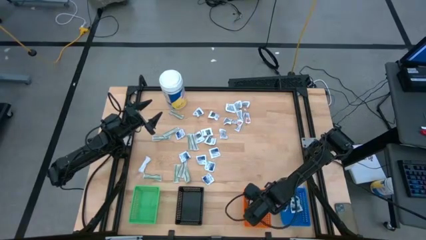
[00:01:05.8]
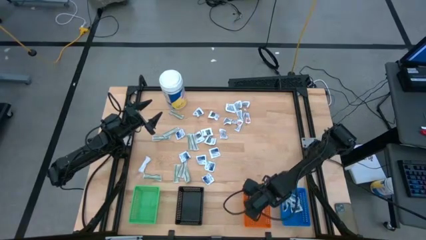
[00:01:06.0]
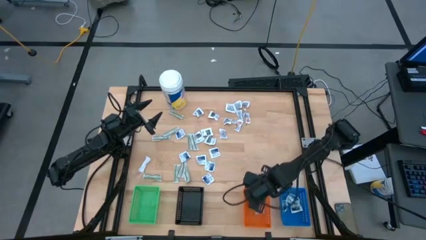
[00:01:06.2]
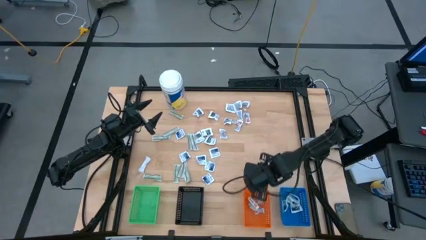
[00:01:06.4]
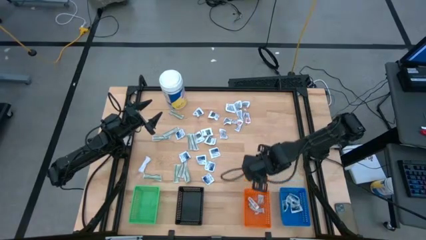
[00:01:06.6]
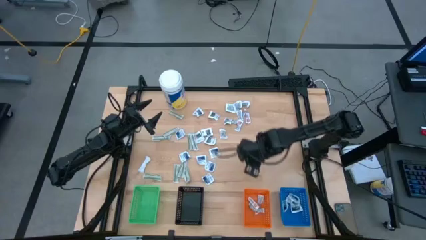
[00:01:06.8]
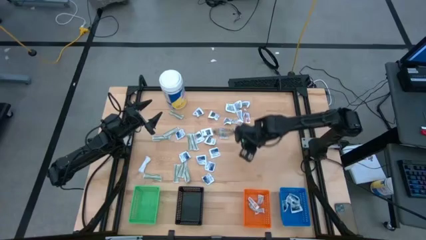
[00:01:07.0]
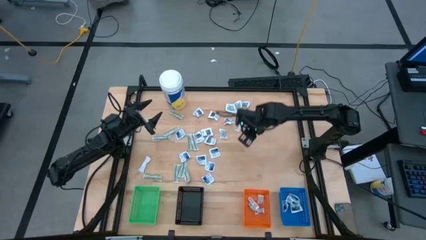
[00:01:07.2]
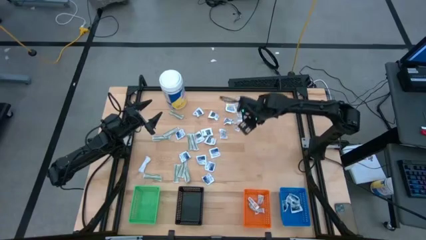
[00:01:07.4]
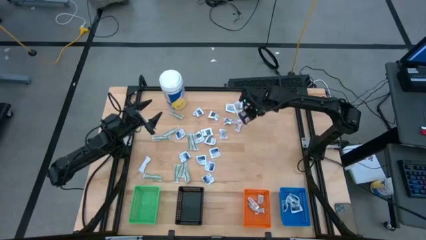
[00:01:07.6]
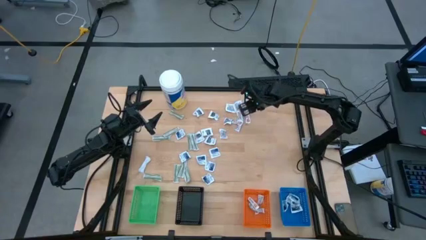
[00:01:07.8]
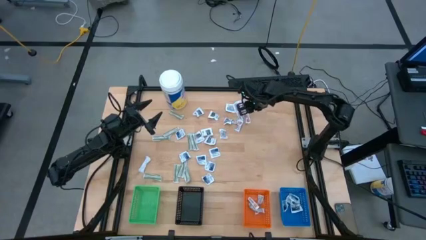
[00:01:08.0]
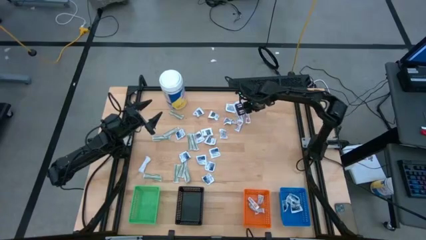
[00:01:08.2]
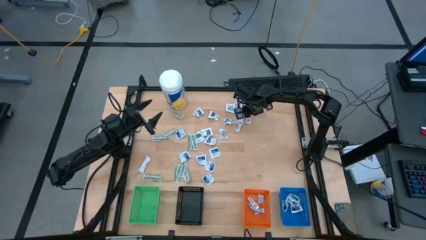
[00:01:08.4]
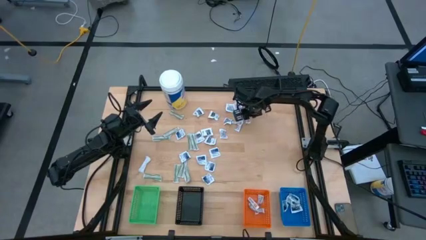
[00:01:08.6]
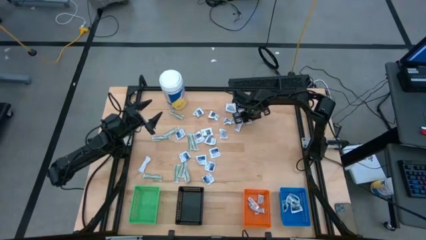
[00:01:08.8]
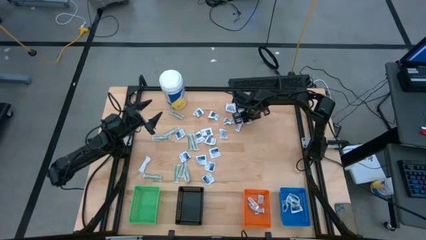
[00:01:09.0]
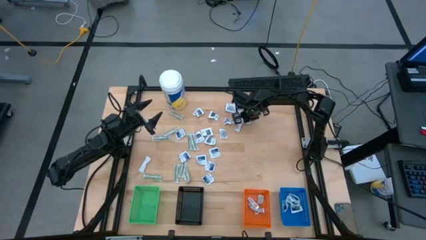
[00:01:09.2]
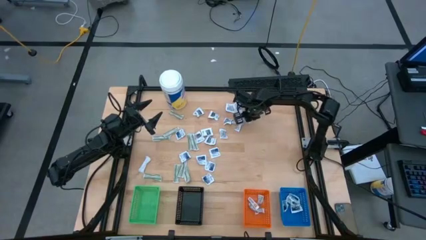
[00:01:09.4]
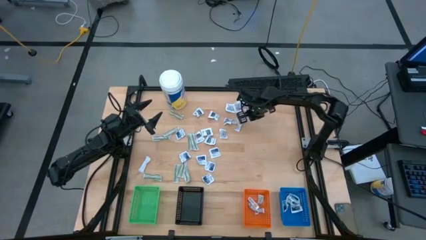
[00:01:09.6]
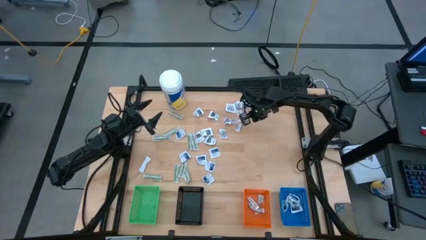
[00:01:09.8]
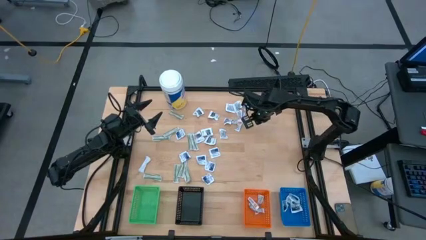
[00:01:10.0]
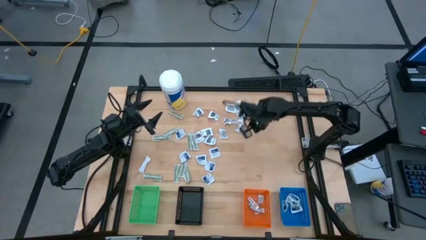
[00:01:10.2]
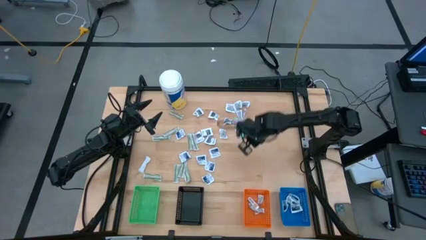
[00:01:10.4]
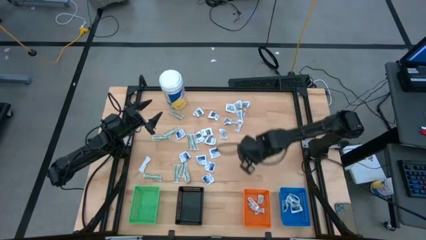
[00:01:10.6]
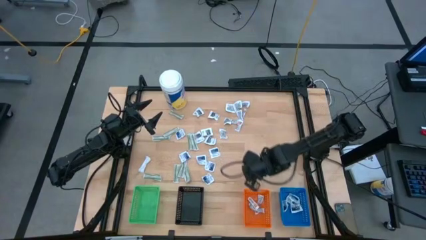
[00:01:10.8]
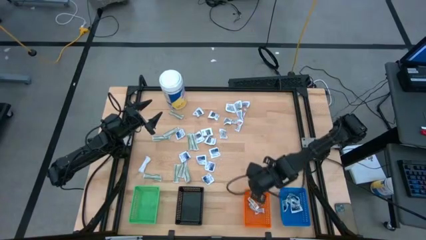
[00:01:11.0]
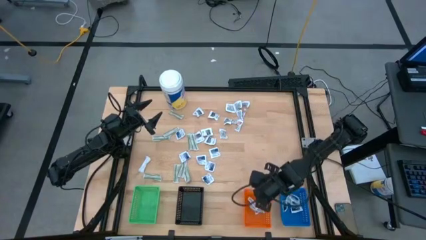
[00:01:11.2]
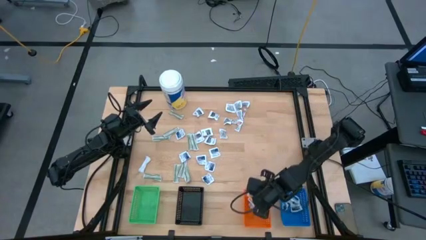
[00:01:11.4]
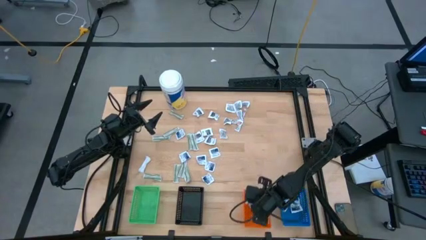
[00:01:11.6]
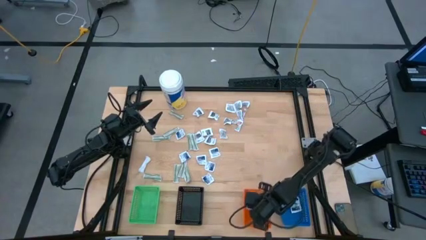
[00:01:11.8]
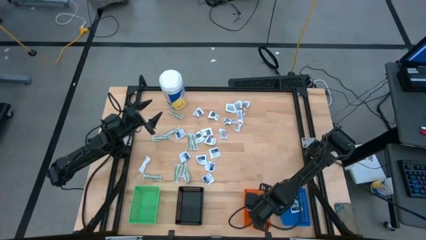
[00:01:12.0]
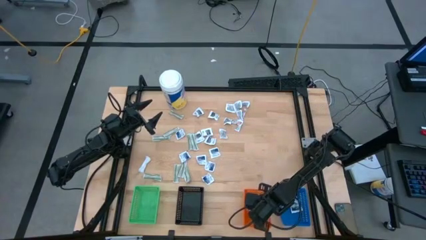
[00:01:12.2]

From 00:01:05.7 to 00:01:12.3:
Task: Pick & Place First Aid Supplies
Put the ointment pack into the orange bin

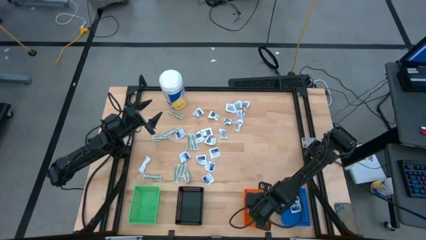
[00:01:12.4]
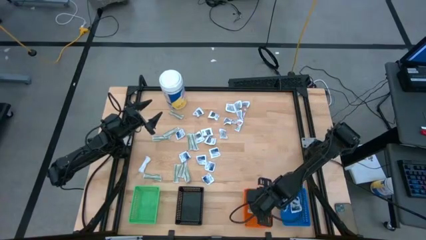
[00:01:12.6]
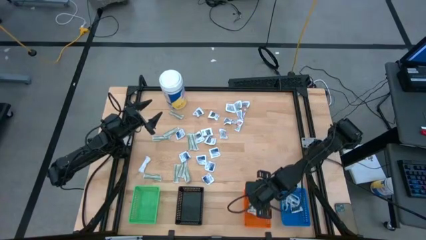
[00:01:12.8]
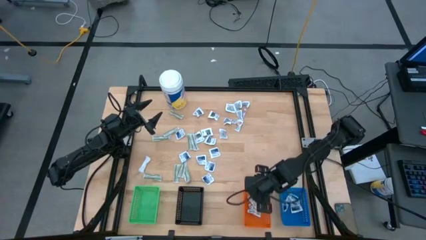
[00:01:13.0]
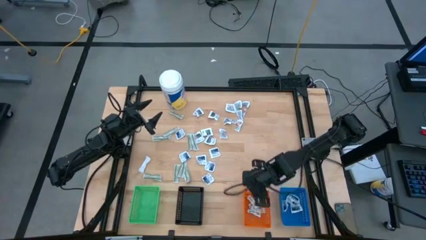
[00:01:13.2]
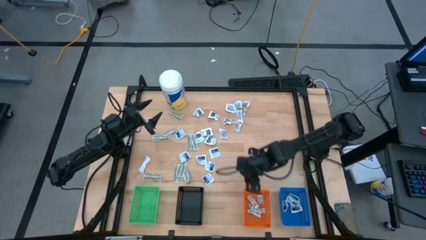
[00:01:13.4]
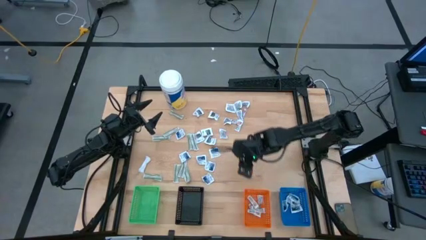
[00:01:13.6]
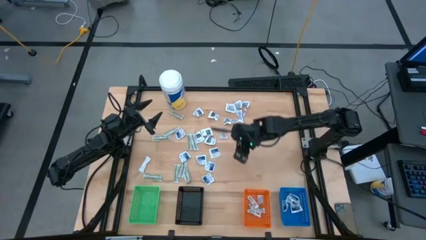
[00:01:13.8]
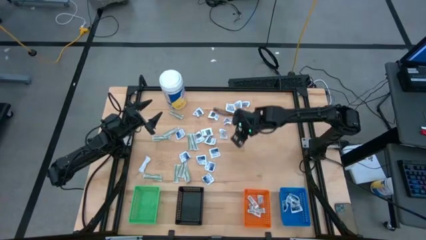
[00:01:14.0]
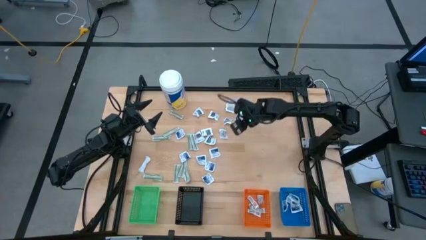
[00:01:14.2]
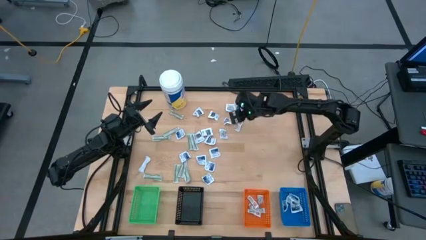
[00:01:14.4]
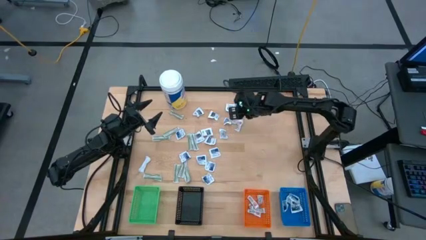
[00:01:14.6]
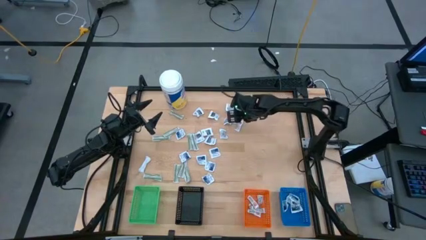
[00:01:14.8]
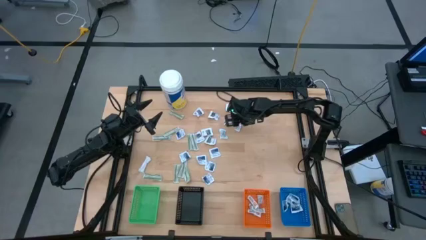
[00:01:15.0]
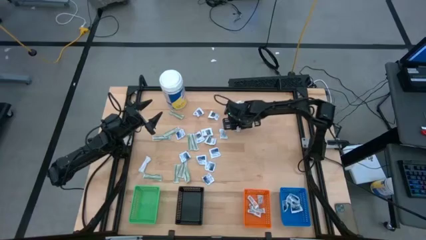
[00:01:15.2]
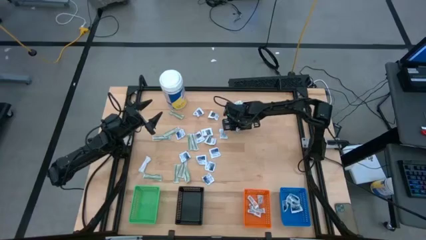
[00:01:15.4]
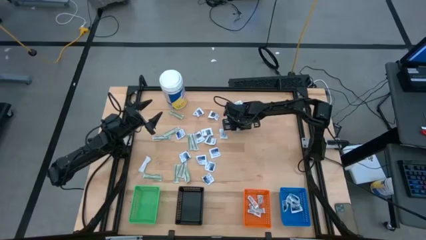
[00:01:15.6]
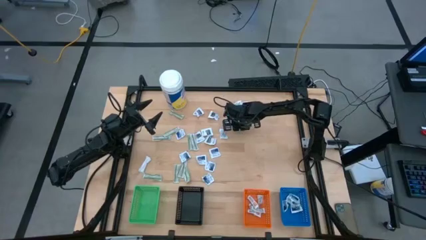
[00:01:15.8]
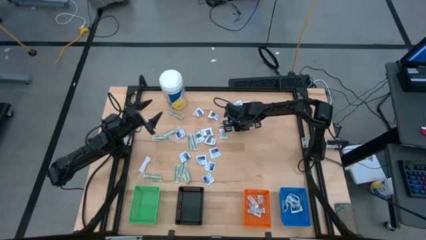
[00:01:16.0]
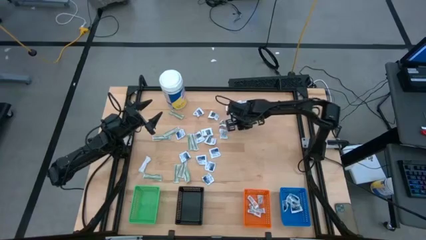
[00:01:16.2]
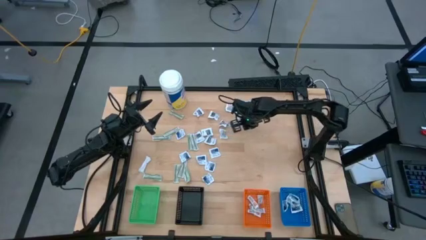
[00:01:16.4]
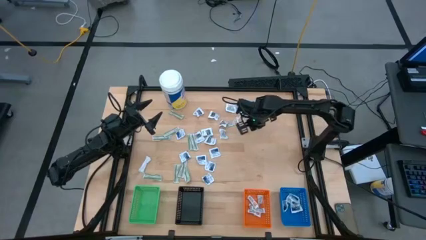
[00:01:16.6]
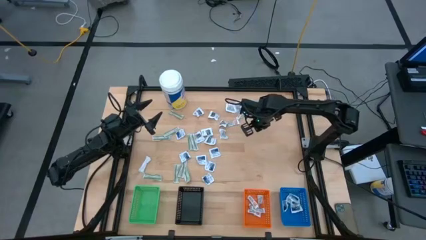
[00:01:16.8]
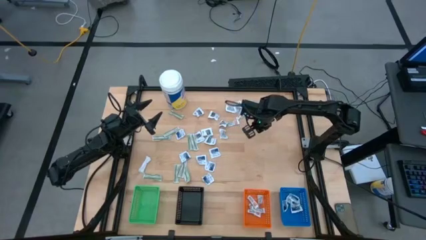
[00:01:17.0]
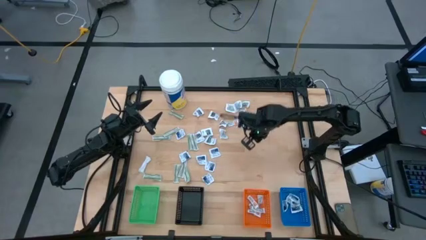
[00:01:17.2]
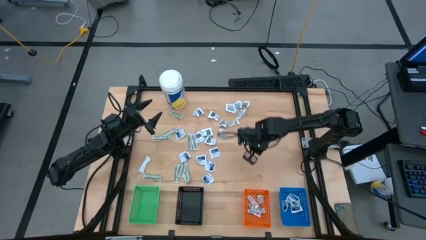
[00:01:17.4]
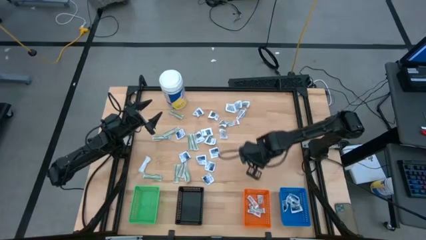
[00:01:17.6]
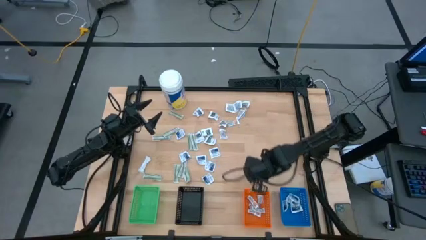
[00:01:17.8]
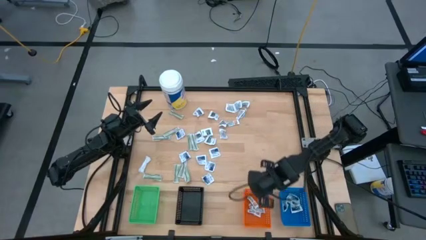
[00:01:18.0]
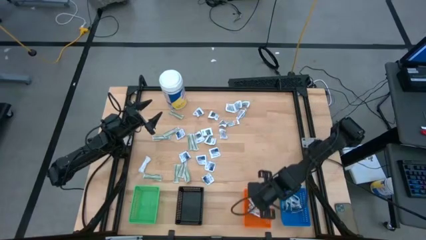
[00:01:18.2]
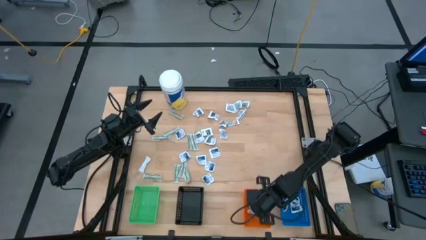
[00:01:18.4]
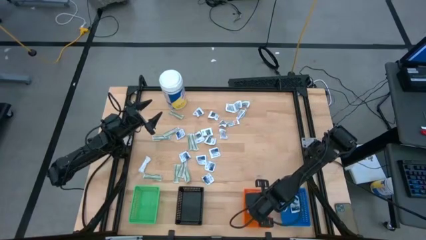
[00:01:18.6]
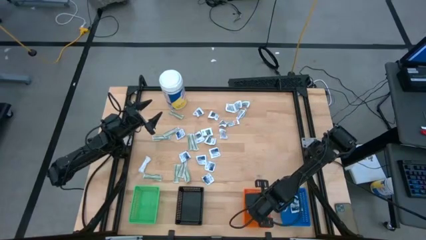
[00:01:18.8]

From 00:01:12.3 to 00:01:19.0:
Put the ointment pack into the orange bin

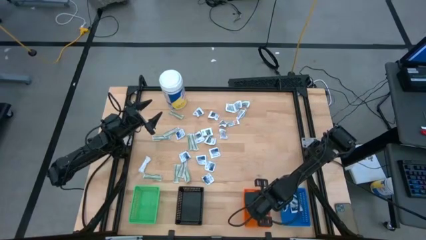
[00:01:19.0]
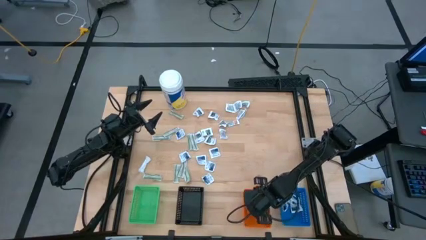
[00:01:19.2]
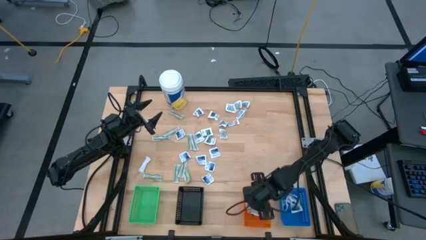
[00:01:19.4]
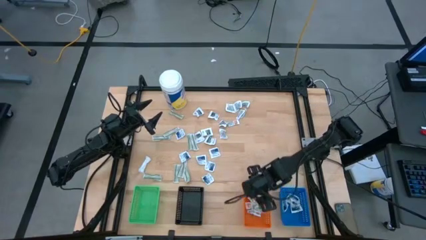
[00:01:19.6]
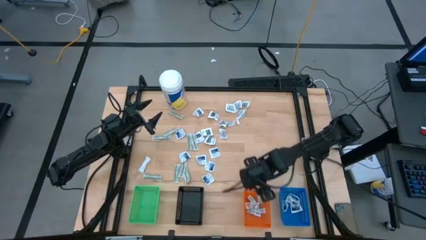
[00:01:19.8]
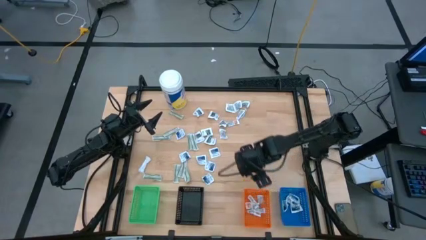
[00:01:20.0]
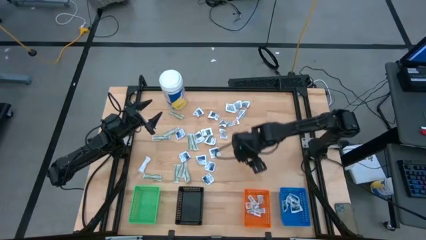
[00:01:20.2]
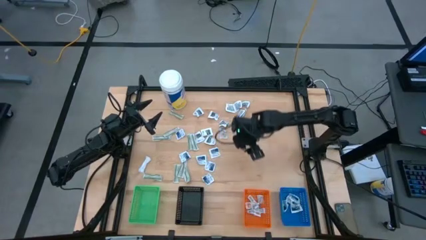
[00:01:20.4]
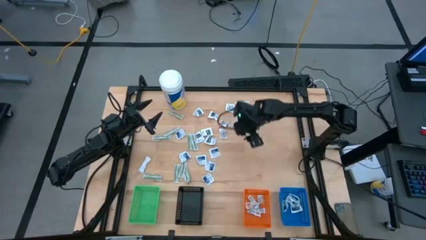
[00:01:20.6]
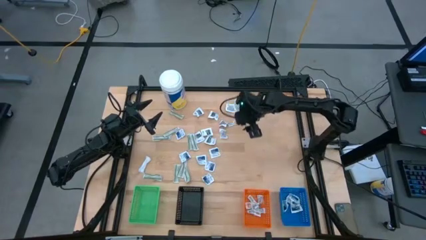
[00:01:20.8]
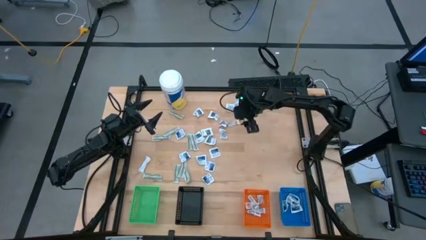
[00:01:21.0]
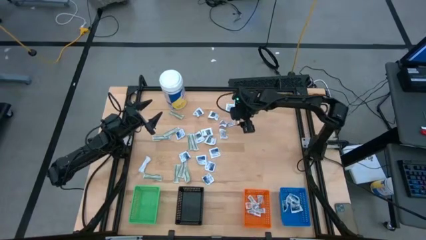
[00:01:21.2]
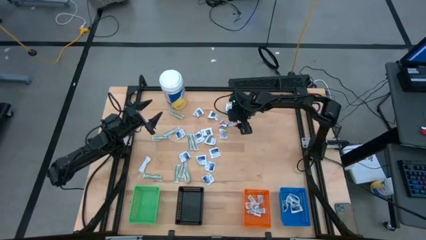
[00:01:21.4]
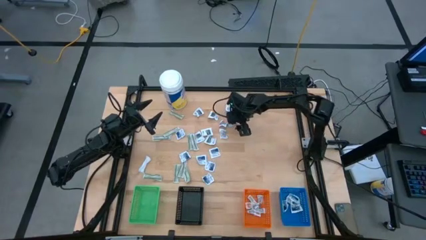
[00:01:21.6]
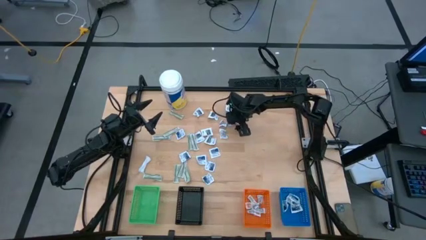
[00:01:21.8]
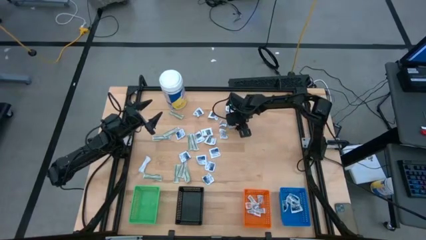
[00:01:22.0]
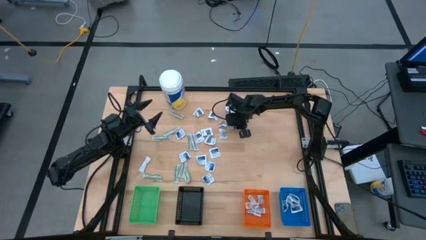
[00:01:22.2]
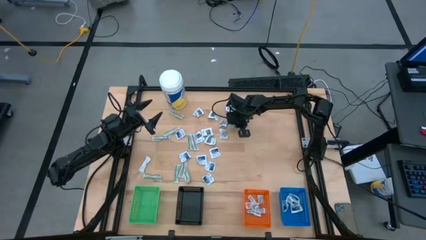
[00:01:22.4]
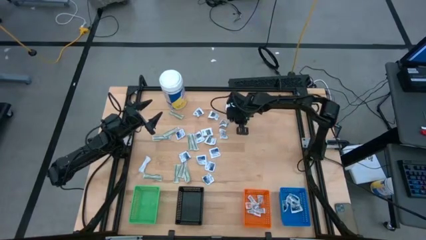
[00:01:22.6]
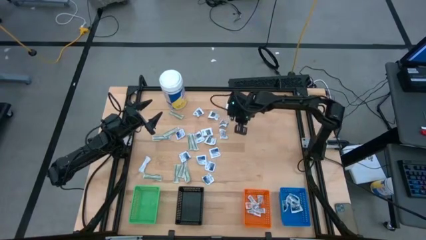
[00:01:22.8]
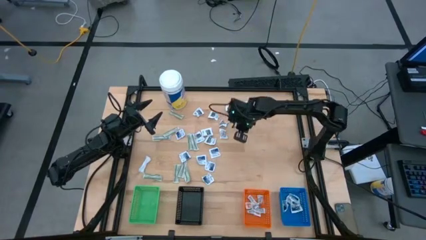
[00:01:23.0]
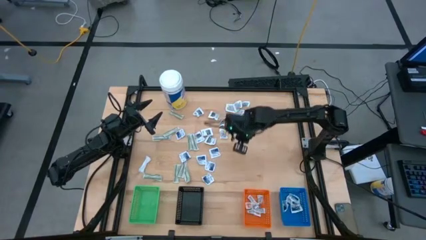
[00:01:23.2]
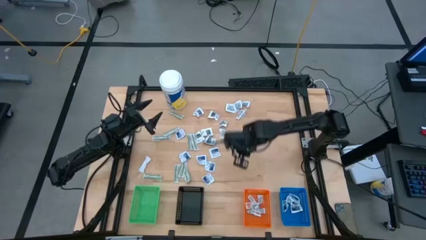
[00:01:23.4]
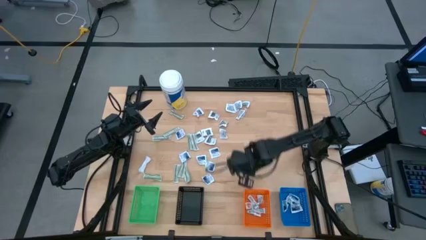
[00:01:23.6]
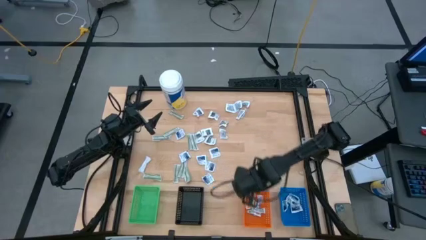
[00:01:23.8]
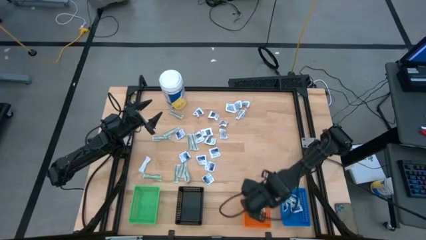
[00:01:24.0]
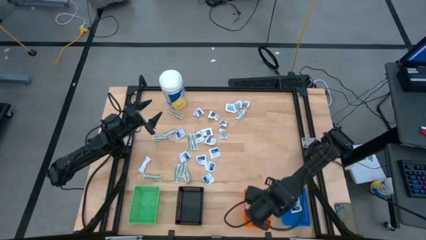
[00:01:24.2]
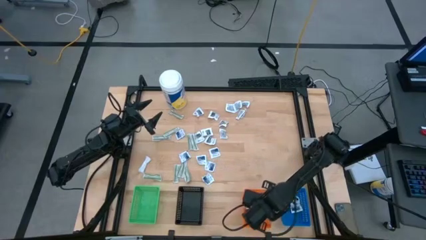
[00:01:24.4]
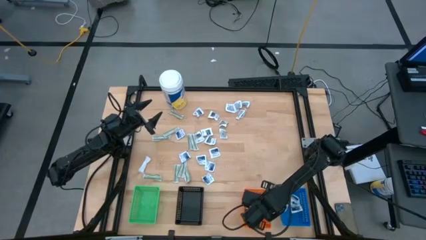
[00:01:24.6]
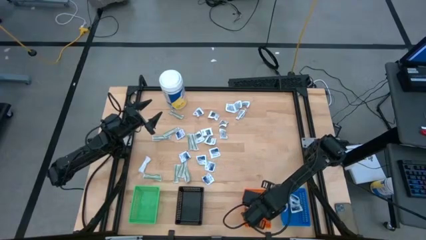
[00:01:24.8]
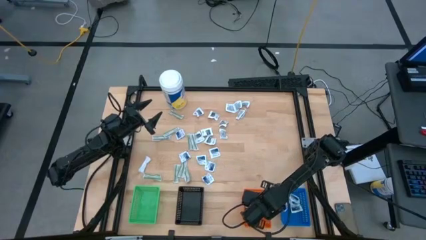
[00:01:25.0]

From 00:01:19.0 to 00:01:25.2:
Put the ointment pack into the orange bin
